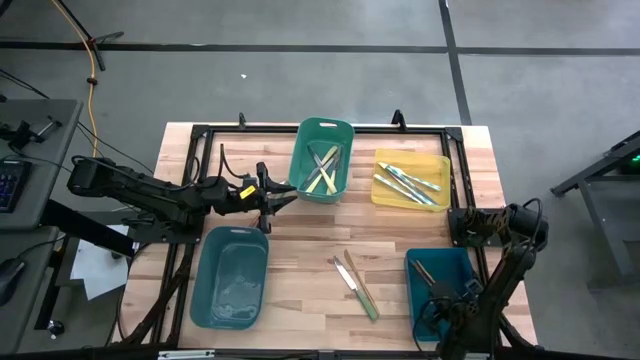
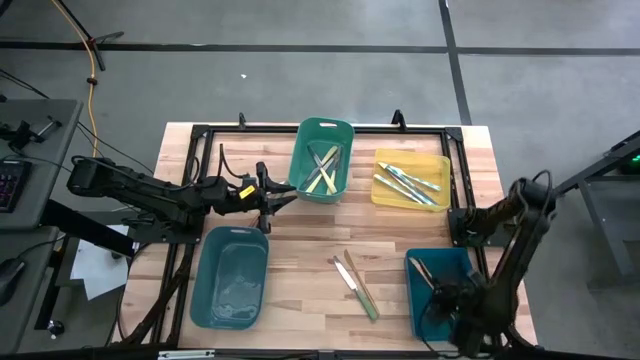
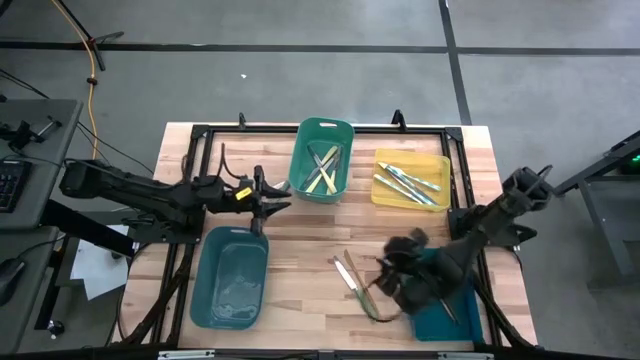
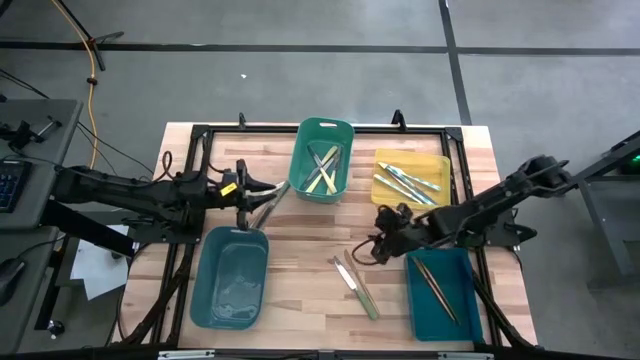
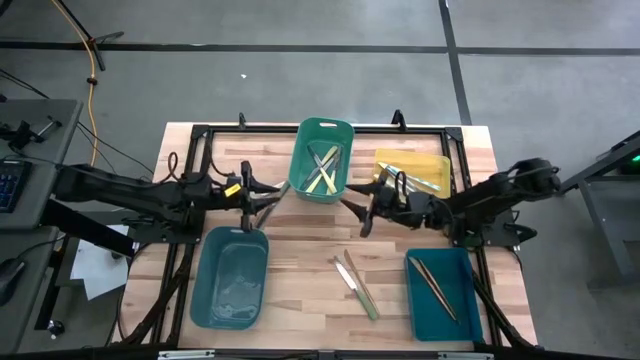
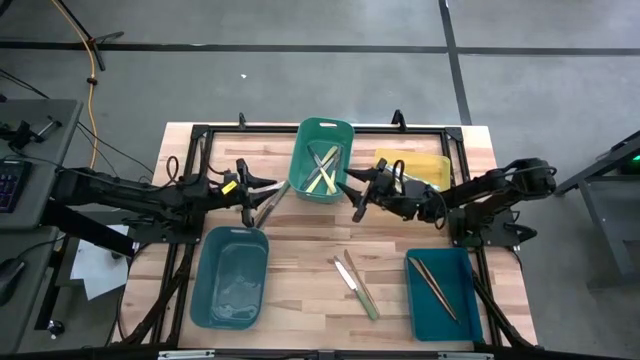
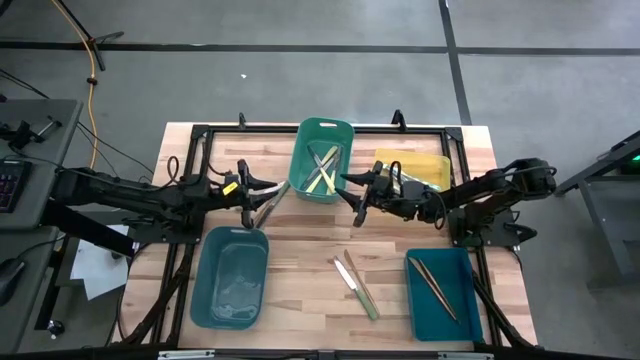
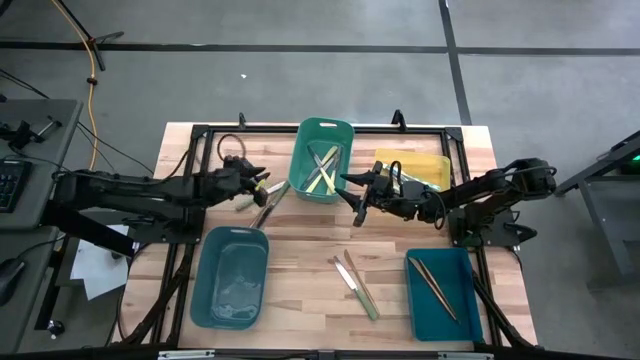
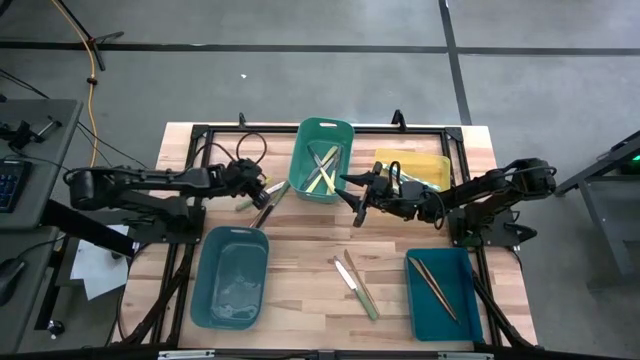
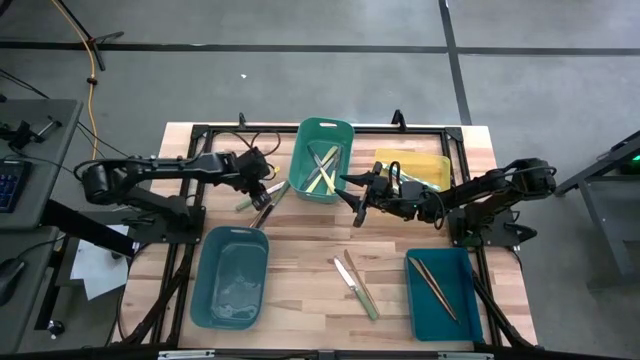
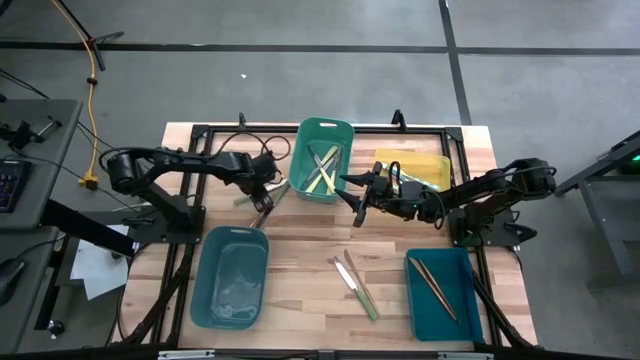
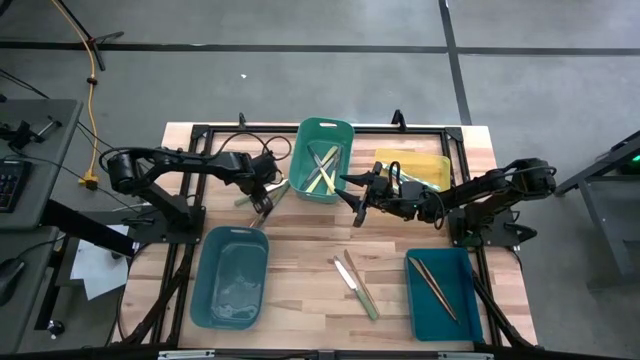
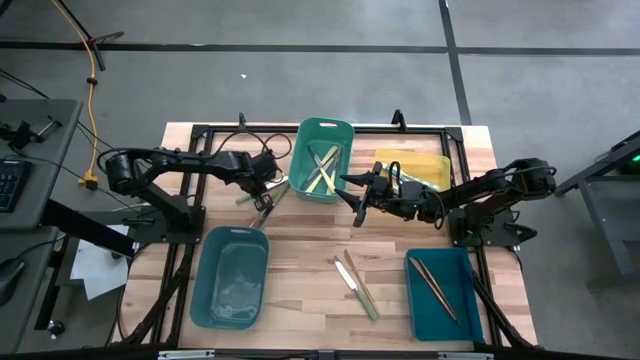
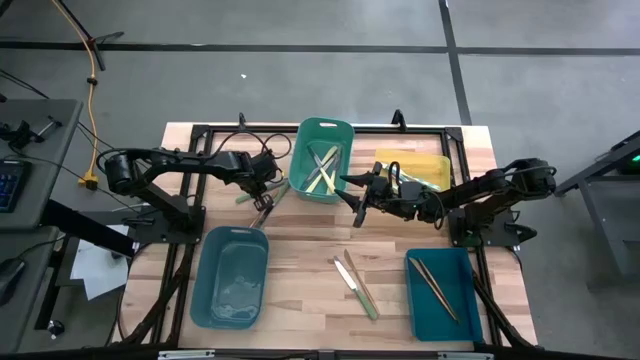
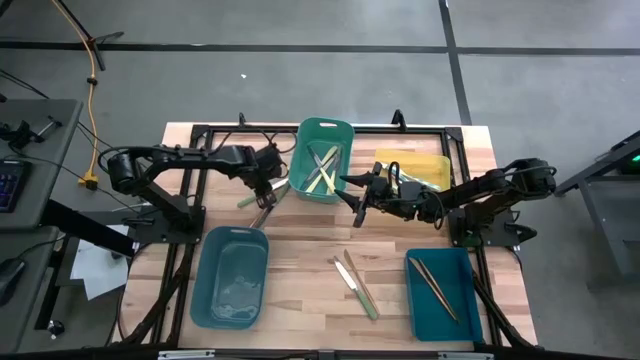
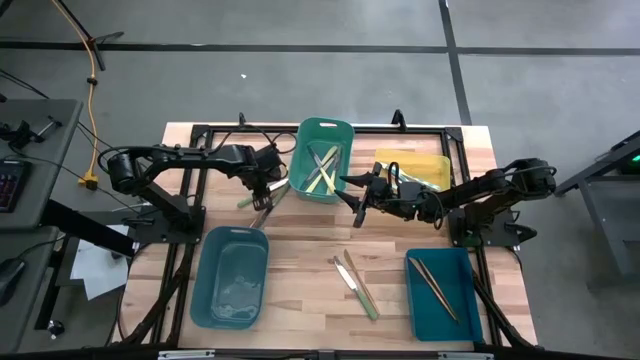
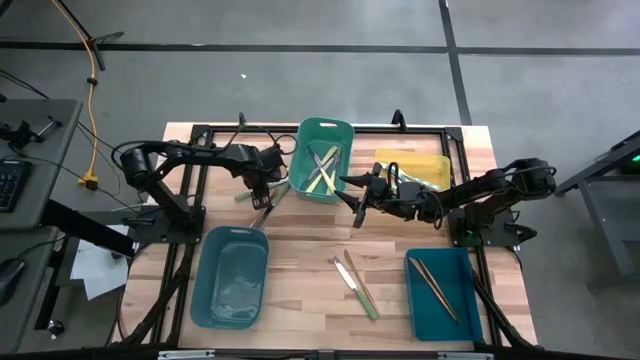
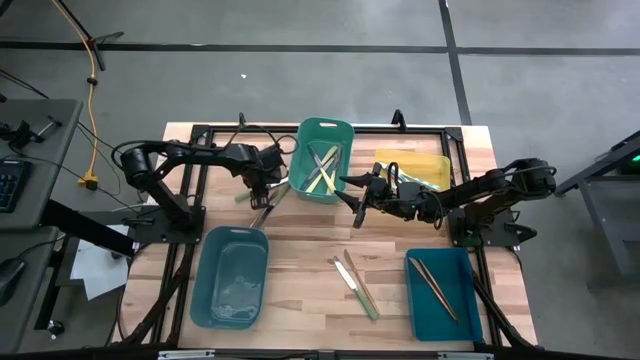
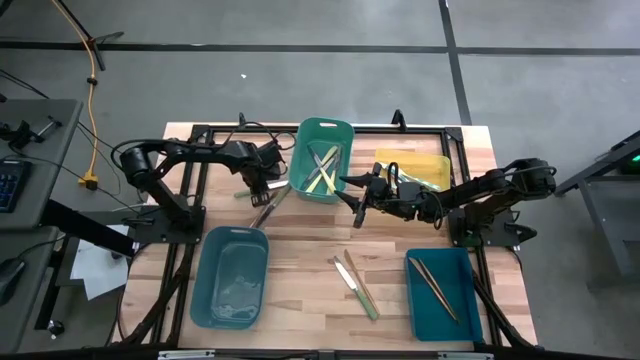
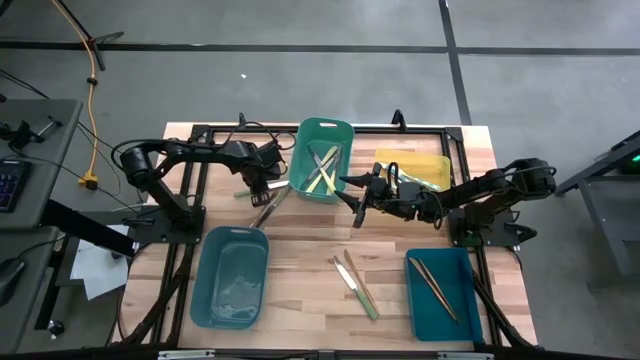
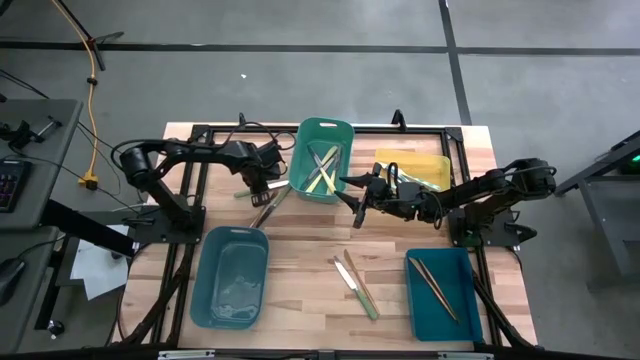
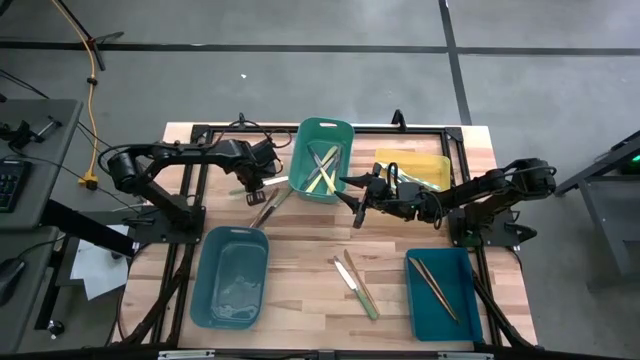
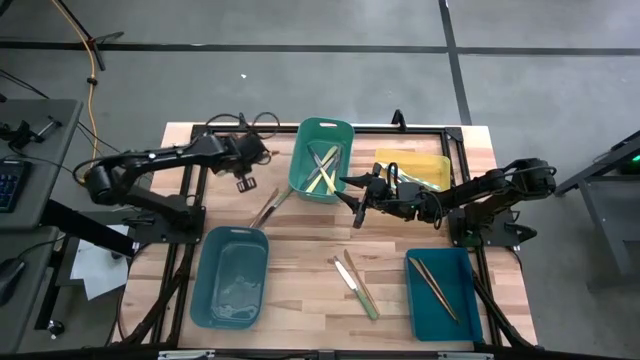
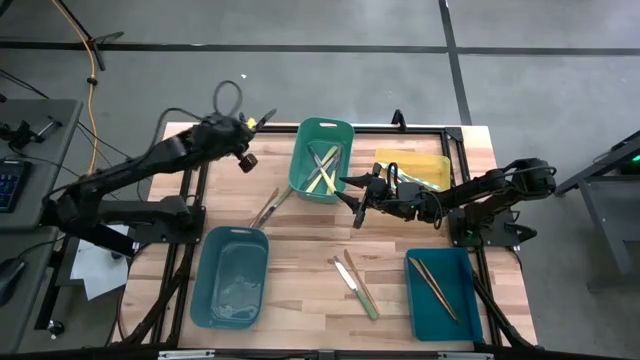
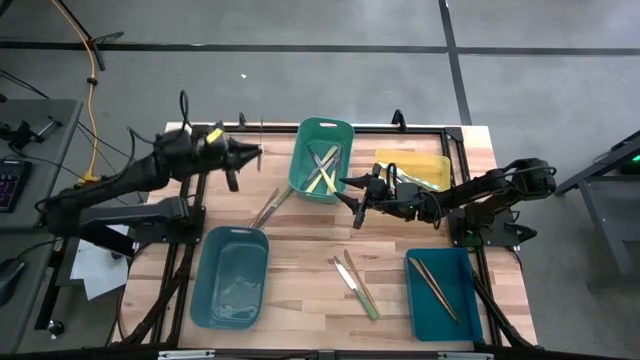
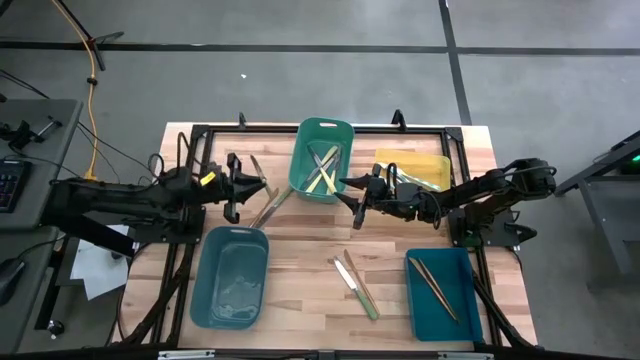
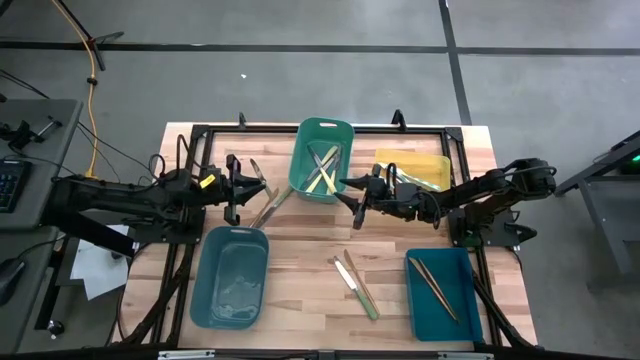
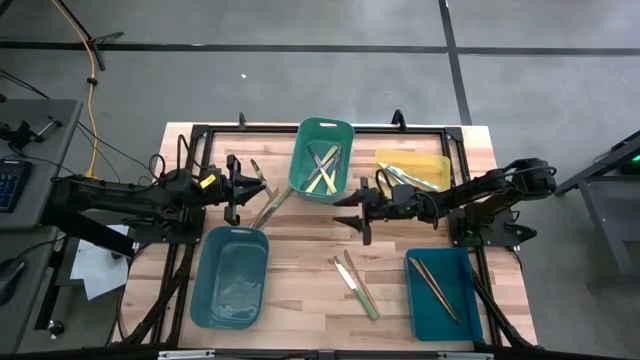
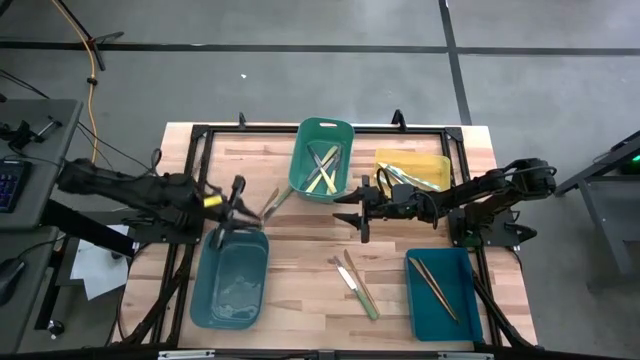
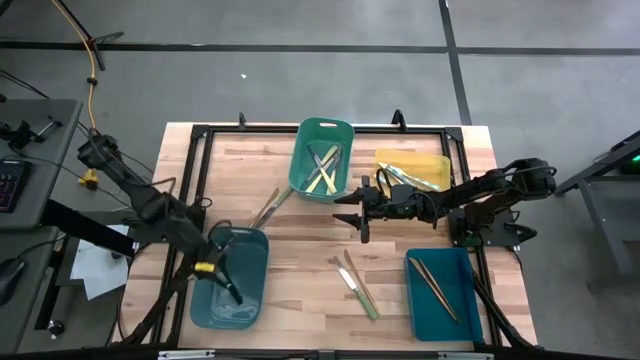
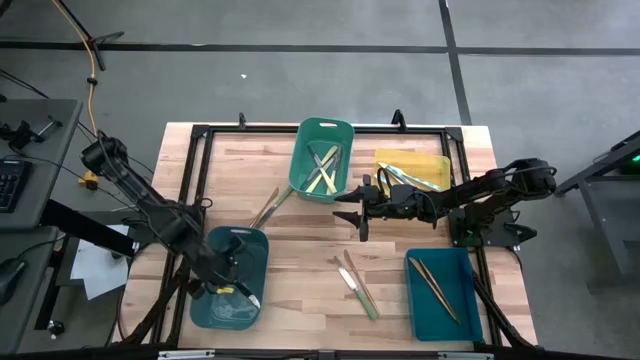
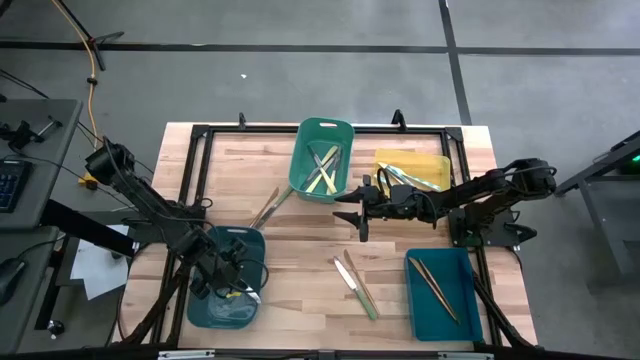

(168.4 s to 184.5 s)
Task: Sort silverware by color (type)
Put the green knife into the left blue bin
